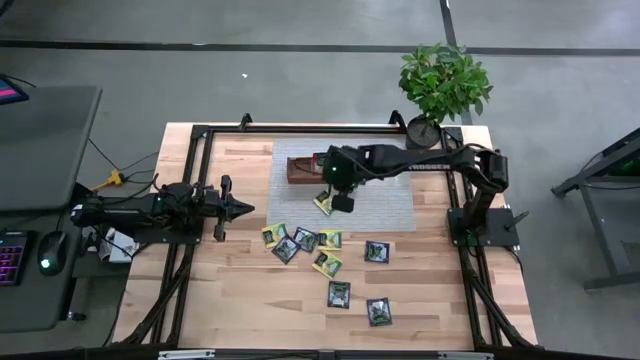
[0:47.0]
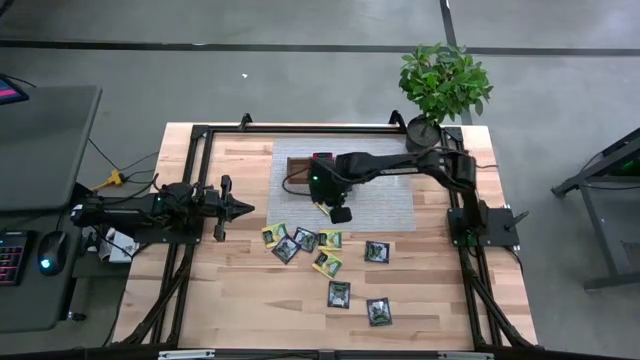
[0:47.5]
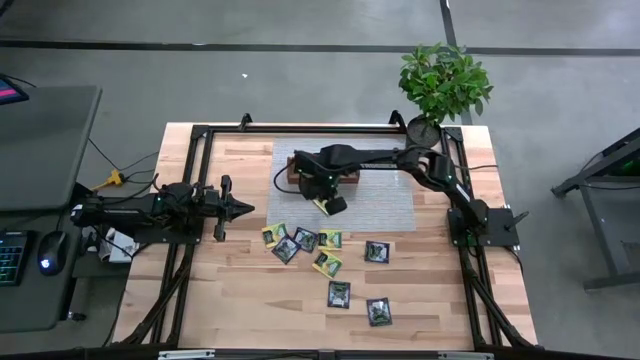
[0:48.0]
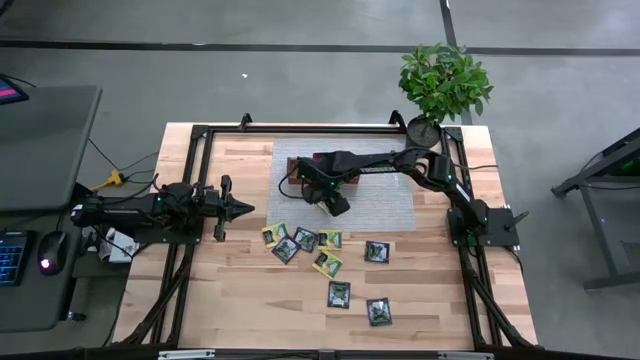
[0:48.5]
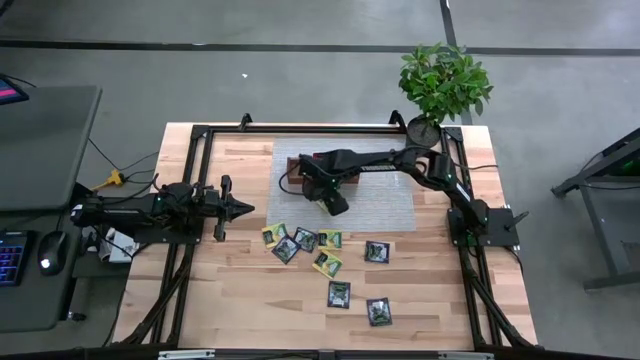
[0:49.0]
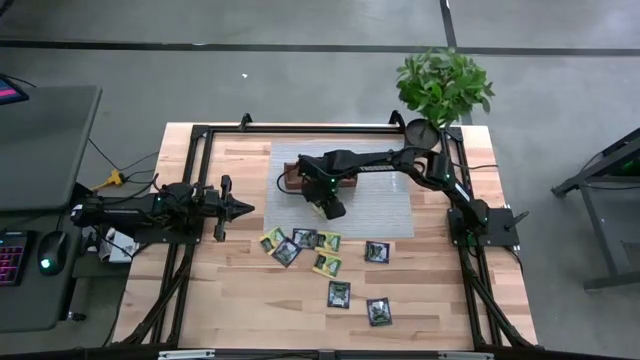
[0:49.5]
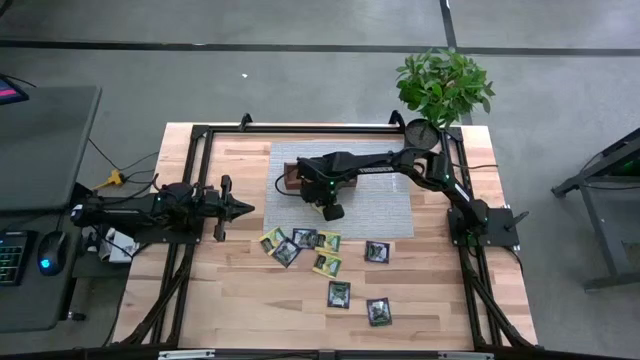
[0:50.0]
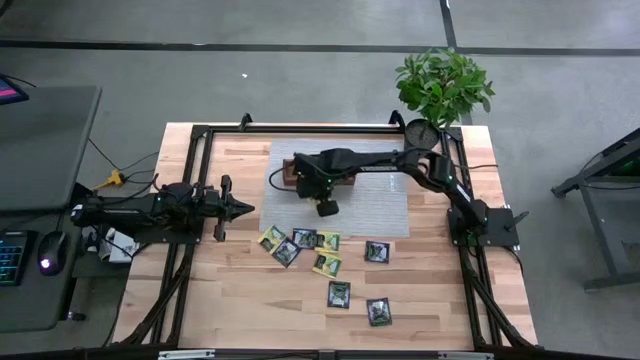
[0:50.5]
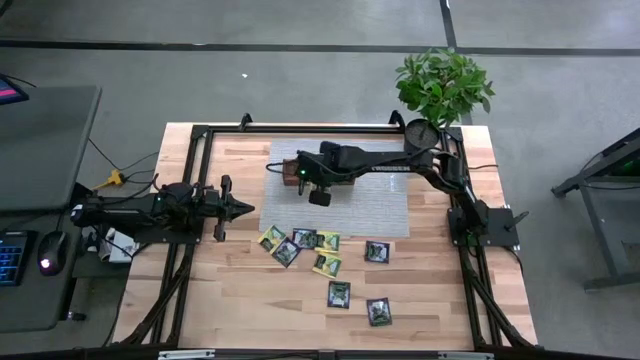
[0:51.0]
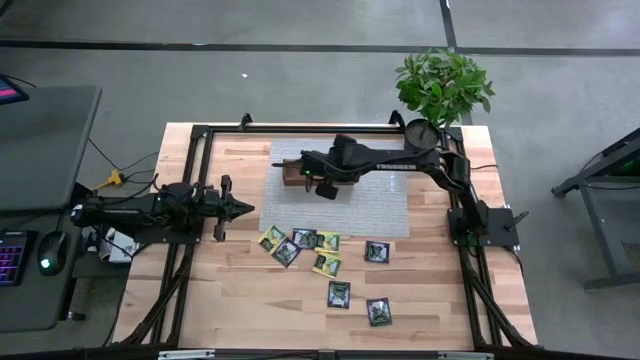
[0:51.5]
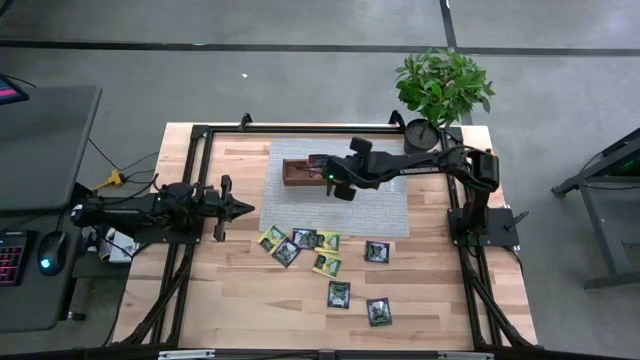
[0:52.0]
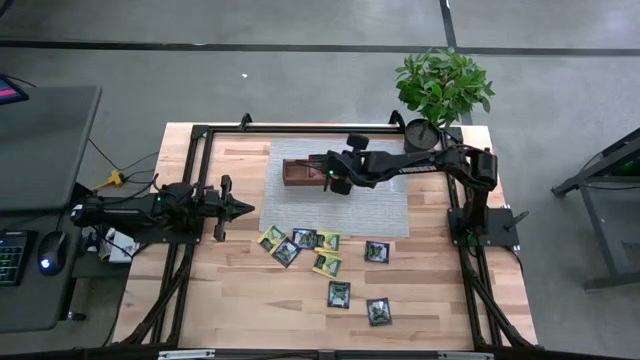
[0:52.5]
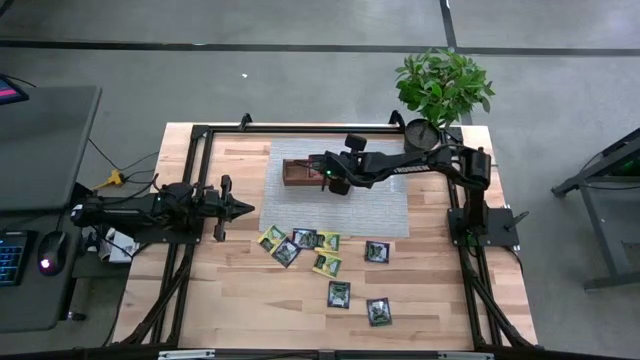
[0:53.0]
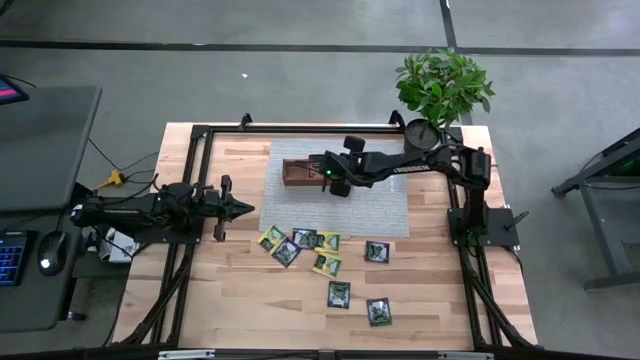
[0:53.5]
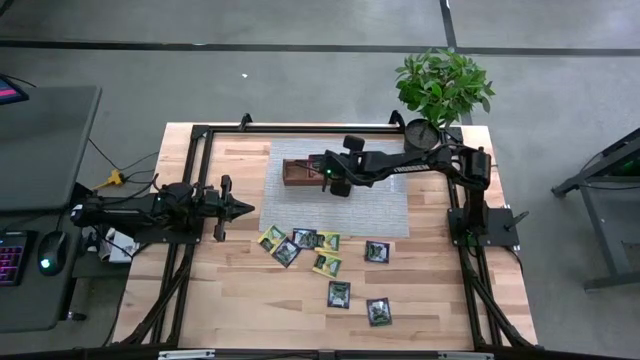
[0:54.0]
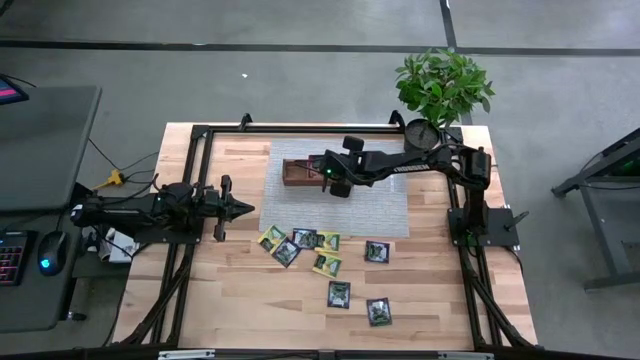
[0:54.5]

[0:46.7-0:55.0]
Task: Pick & Place Tea
Put the yellow tea bag into the right section of the wooden organizer

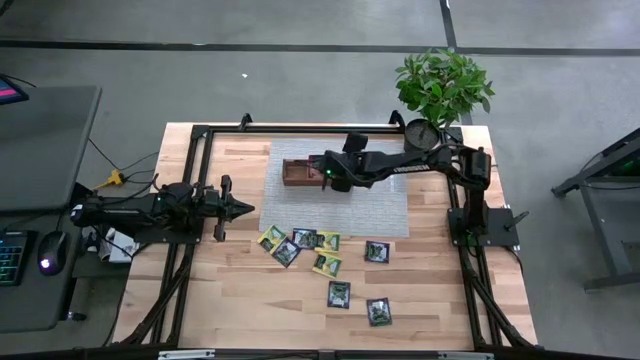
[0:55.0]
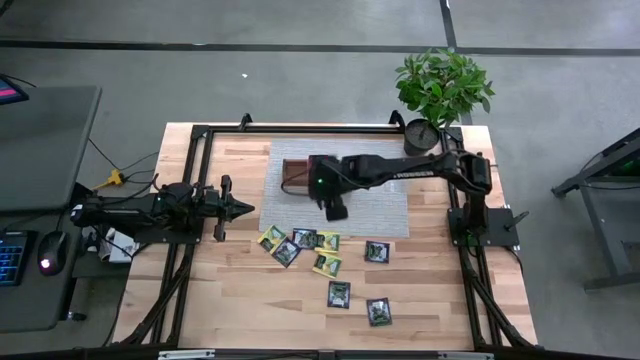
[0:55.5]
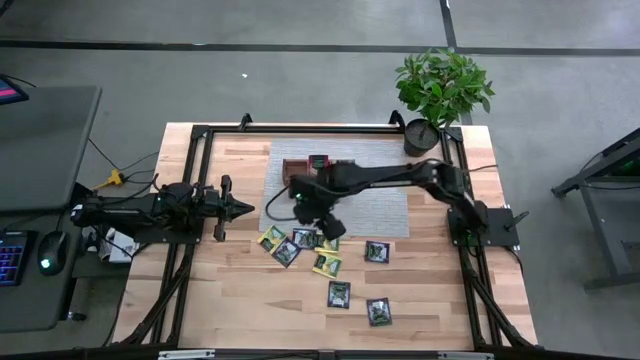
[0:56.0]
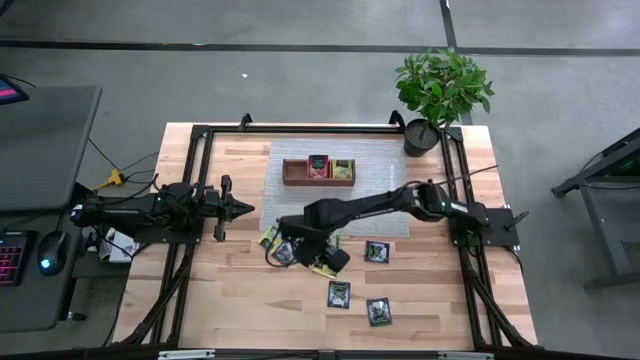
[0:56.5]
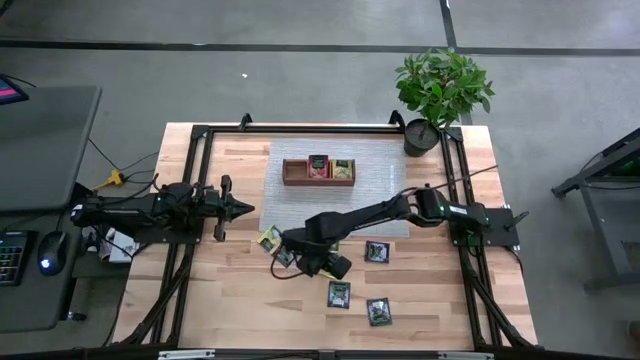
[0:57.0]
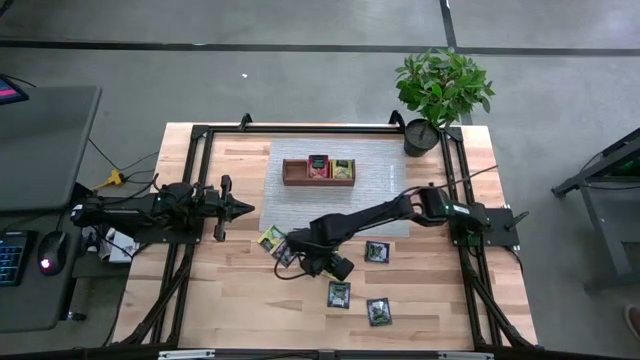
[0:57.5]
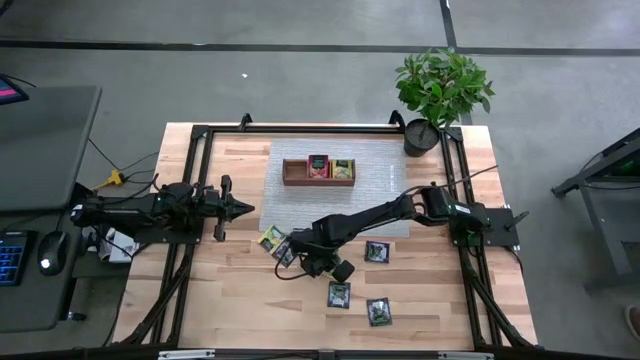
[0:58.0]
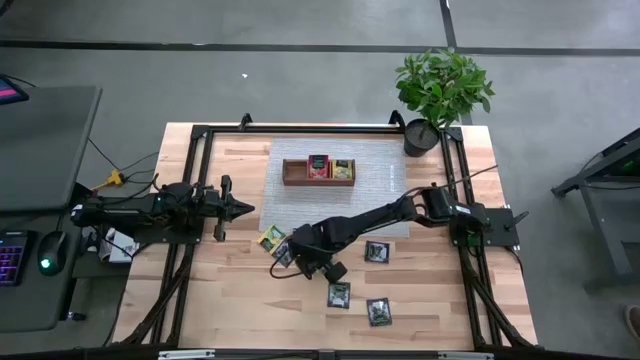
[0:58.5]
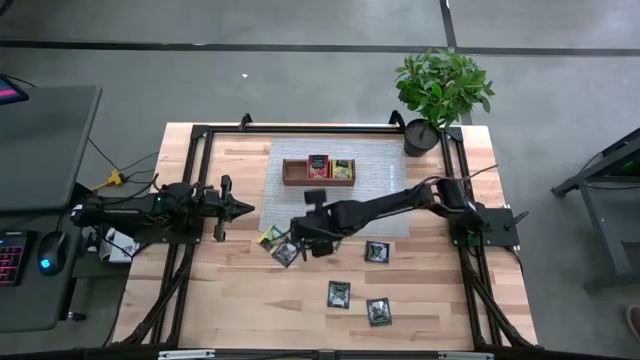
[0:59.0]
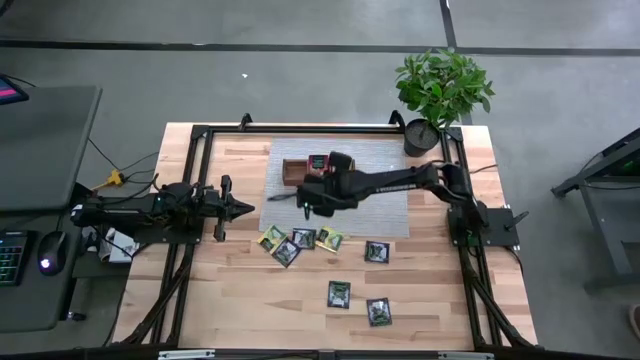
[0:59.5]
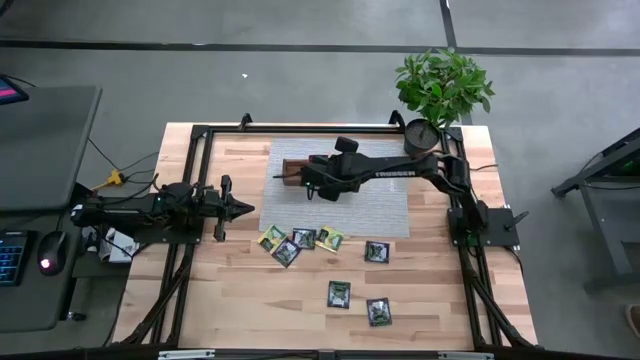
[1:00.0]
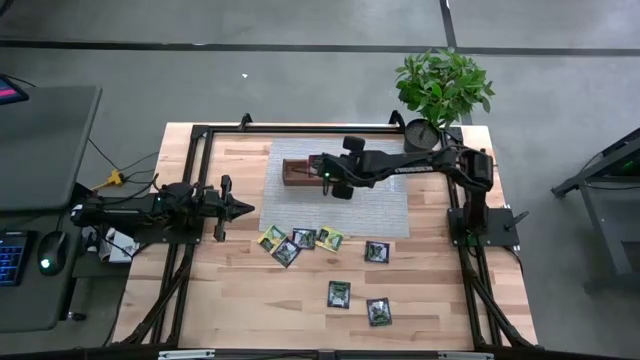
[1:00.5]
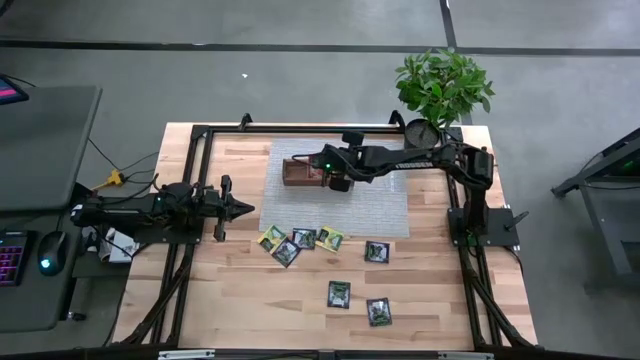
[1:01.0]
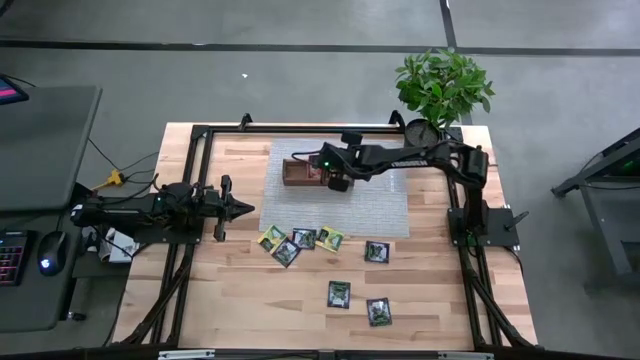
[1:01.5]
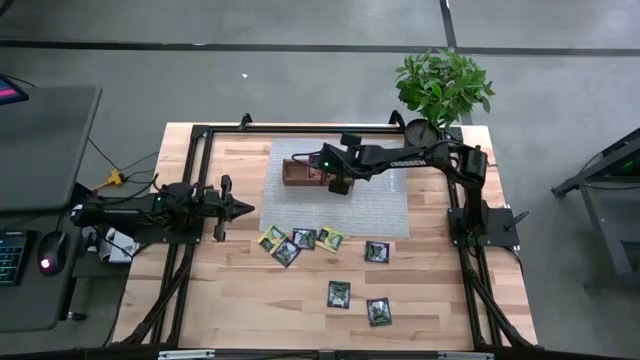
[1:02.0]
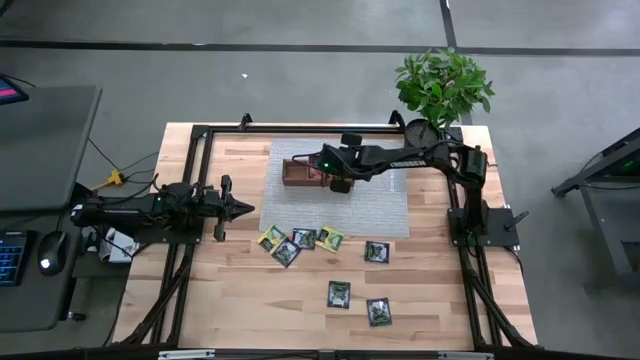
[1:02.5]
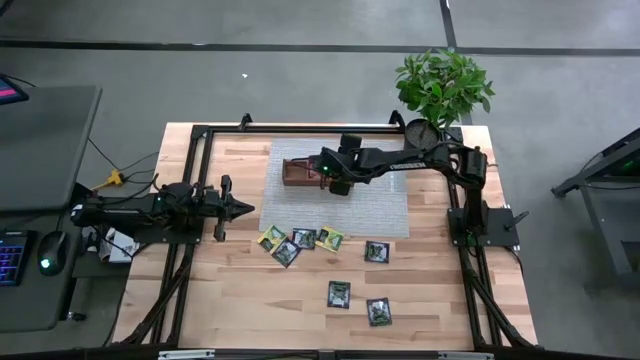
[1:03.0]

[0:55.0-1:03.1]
Put the yellow tea bag into the right section of the wooden organizer

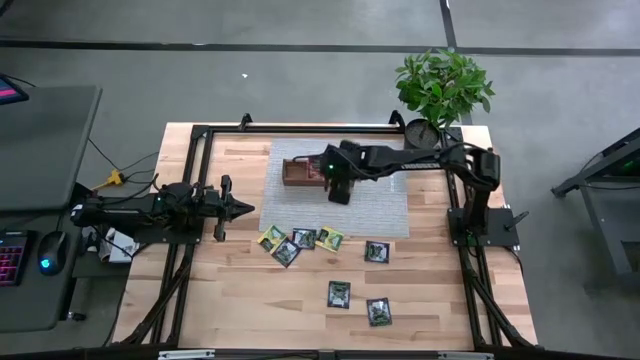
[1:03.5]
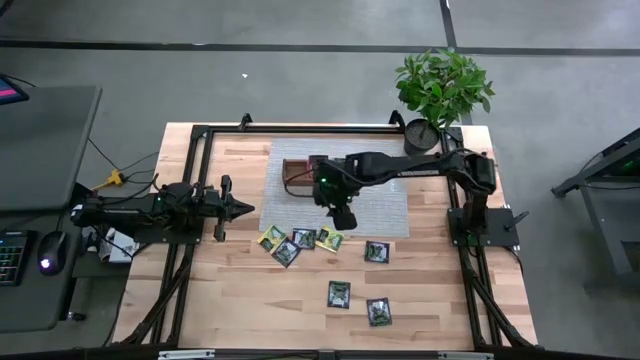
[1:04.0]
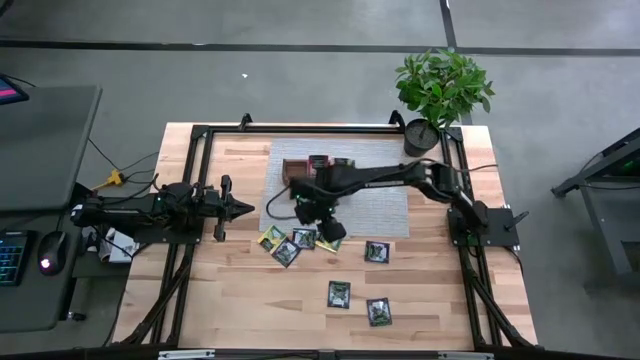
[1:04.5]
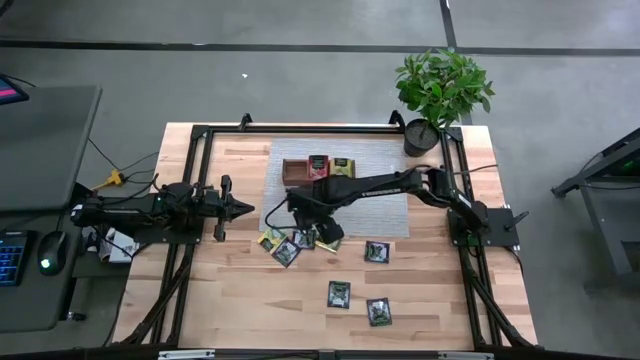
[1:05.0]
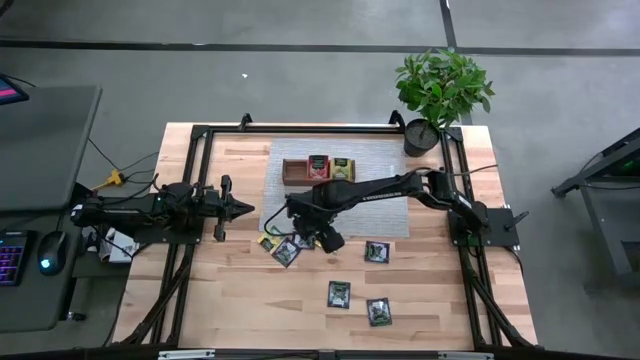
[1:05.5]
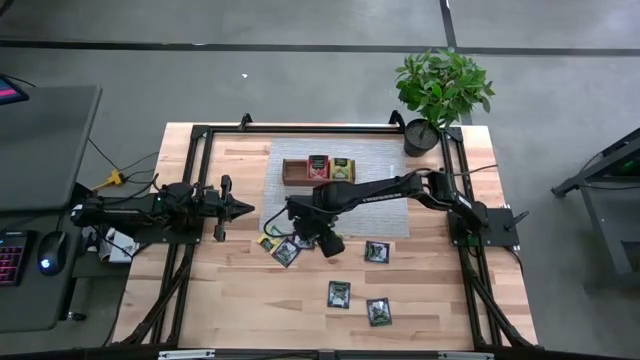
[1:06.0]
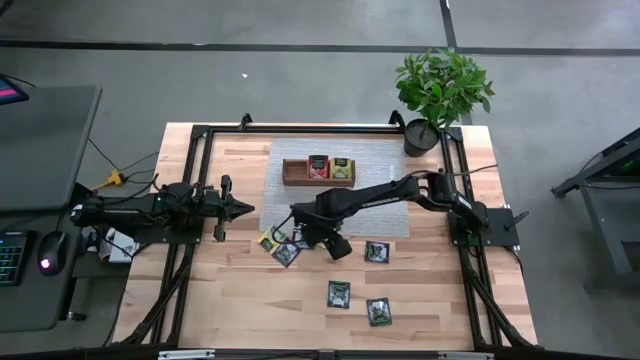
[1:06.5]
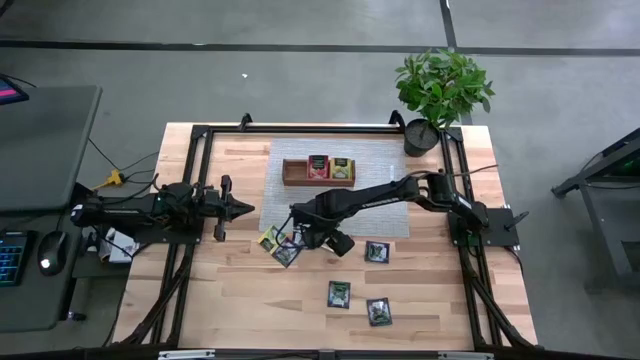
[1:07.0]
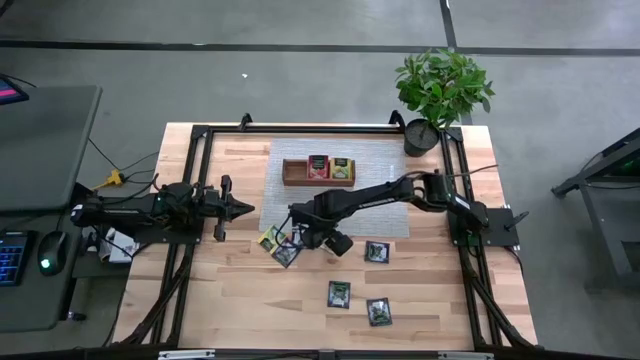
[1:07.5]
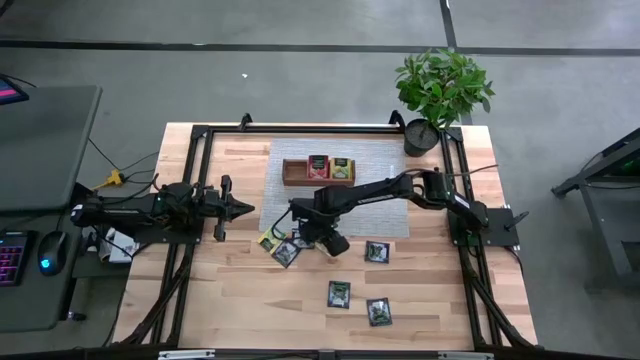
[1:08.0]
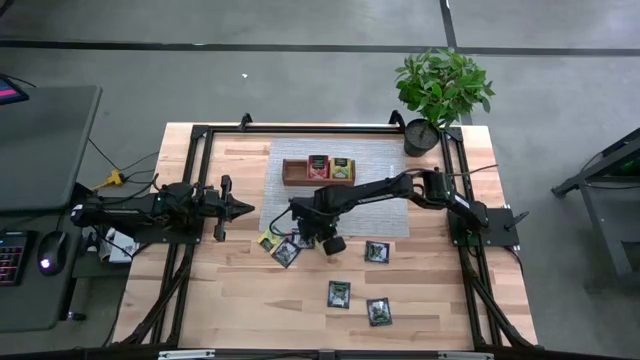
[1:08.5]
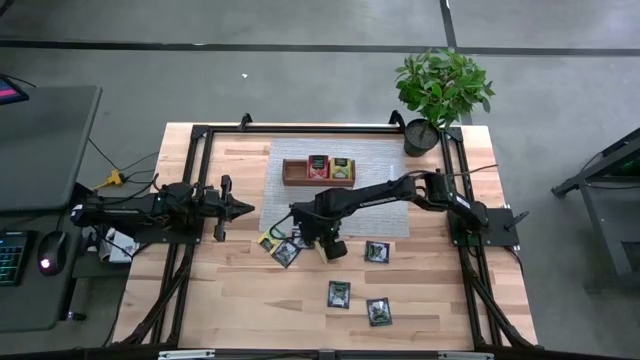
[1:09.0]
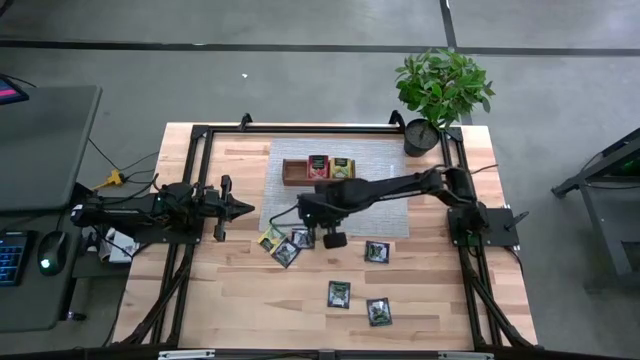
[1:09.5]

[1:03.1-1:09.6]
Put the yellow tea bag into the right section of the wooden organizer
